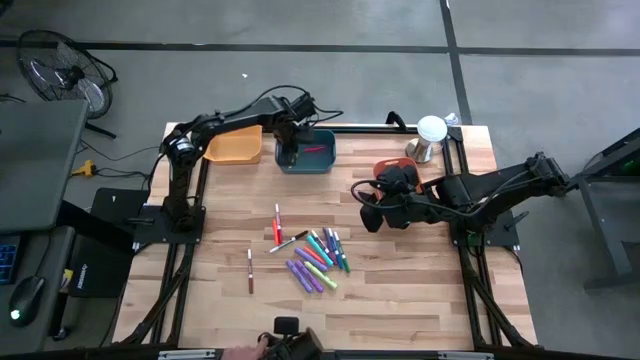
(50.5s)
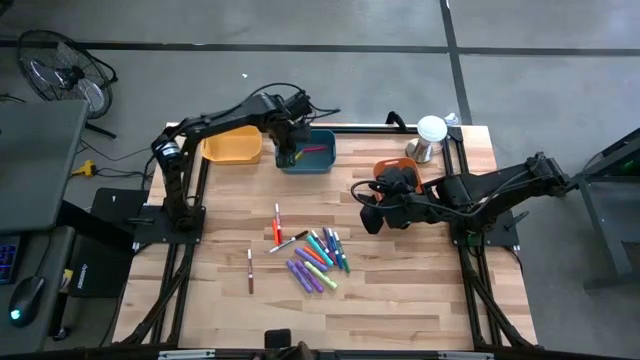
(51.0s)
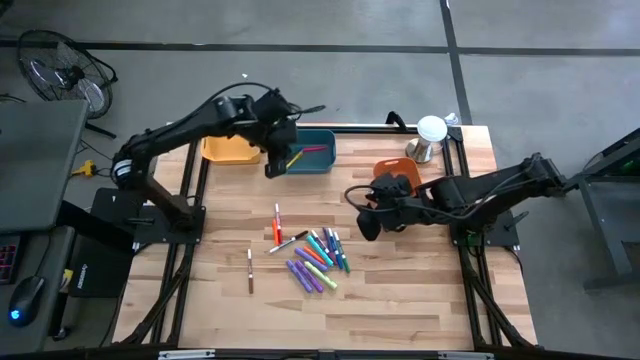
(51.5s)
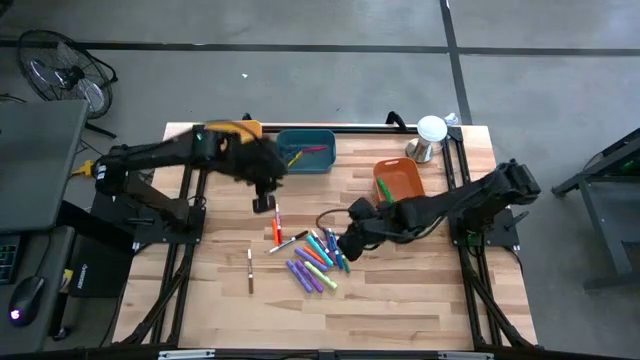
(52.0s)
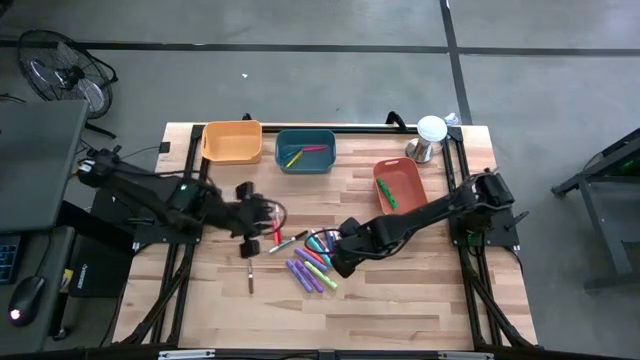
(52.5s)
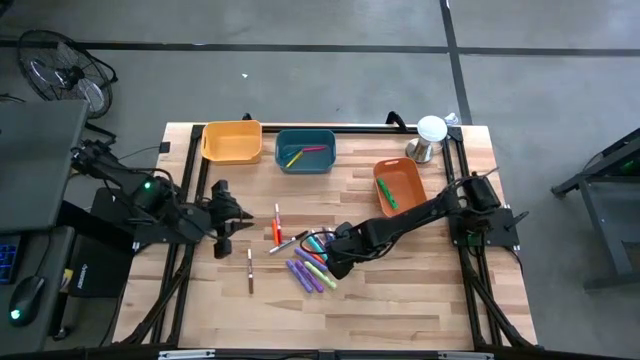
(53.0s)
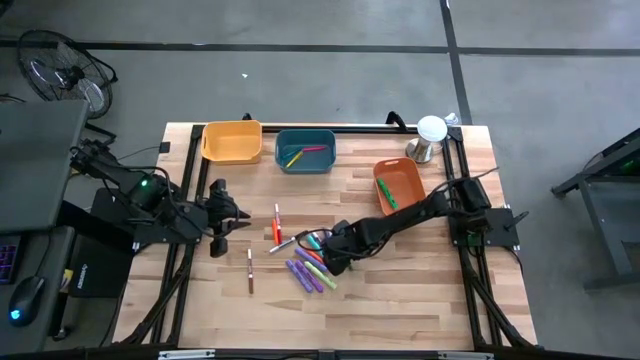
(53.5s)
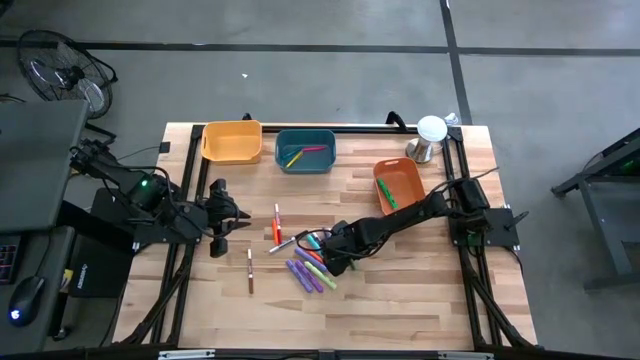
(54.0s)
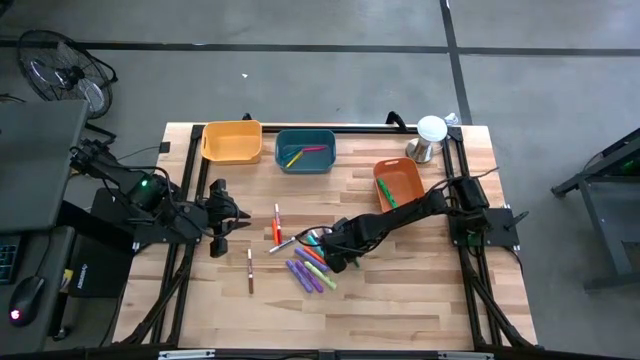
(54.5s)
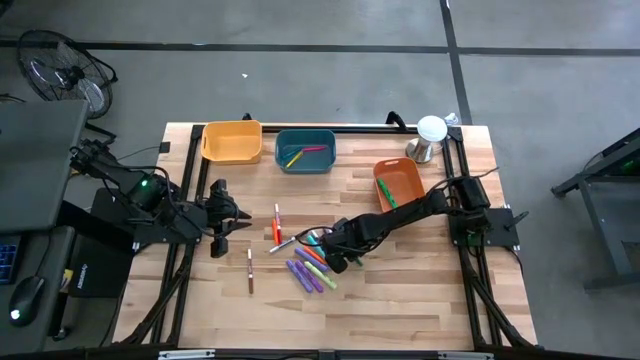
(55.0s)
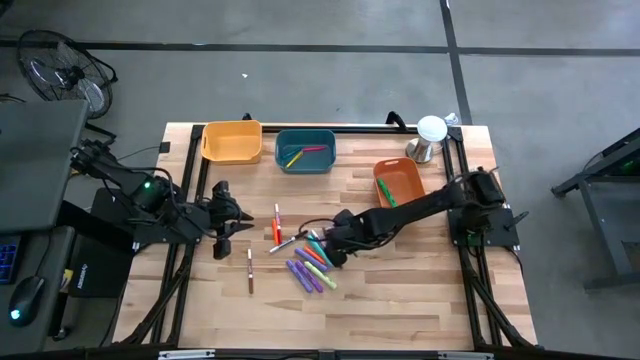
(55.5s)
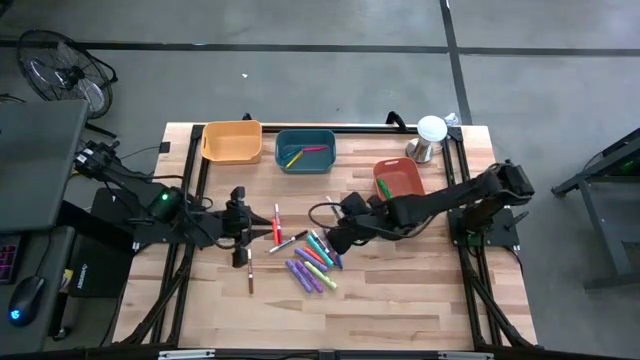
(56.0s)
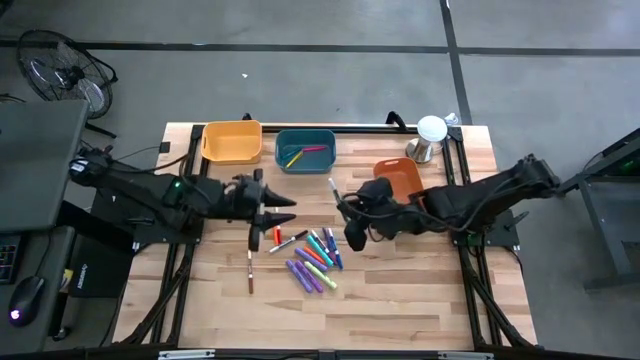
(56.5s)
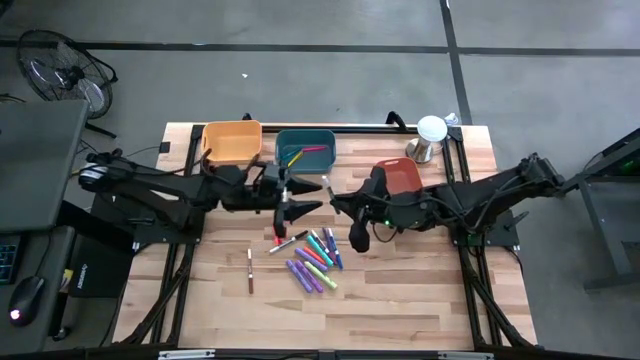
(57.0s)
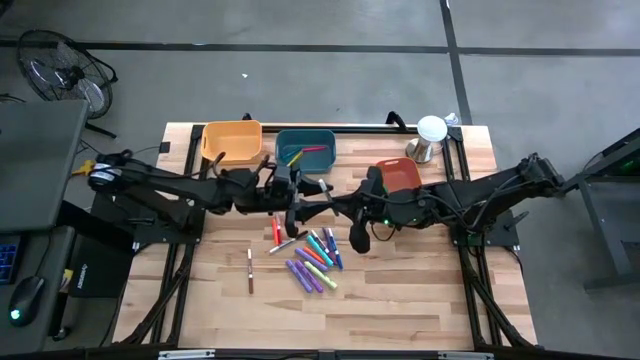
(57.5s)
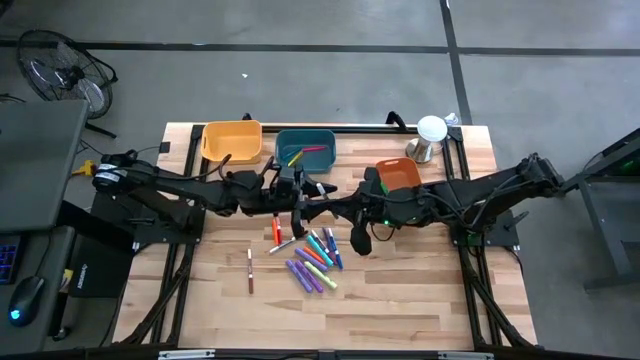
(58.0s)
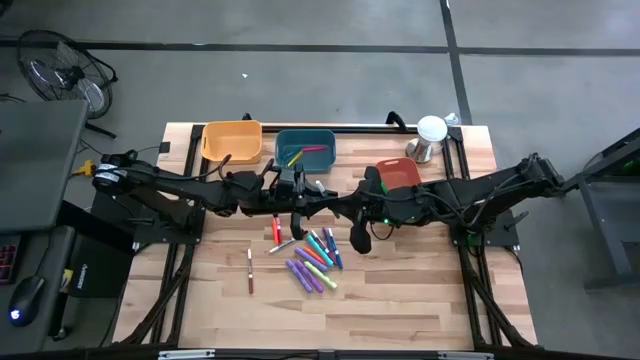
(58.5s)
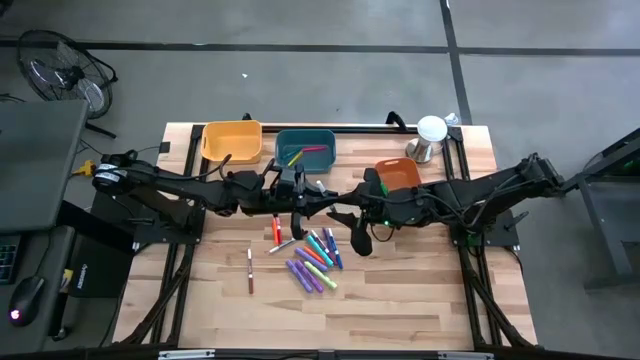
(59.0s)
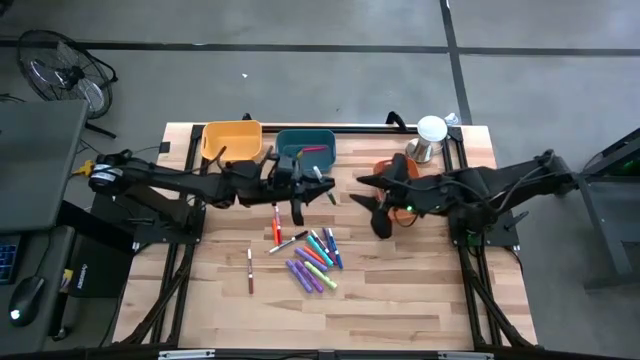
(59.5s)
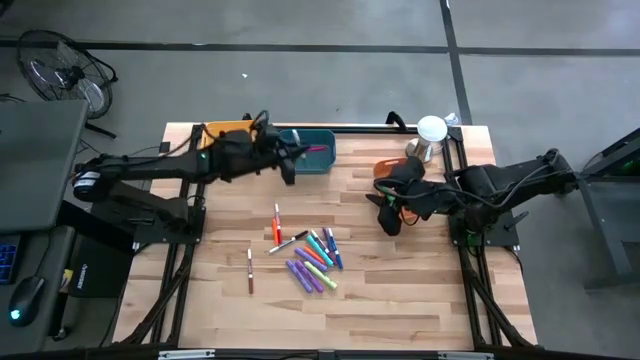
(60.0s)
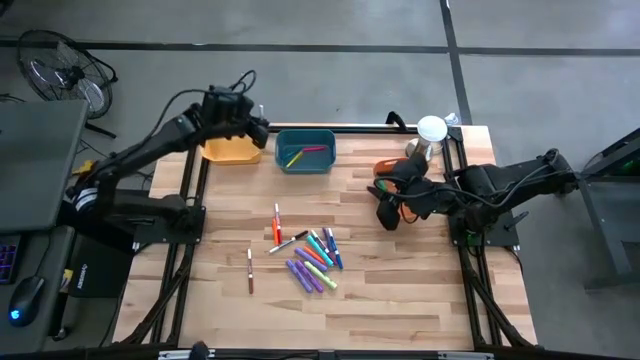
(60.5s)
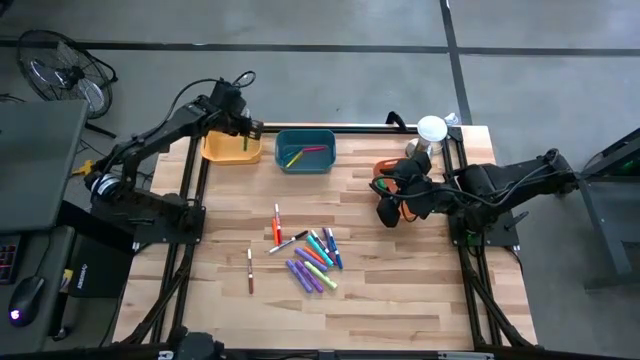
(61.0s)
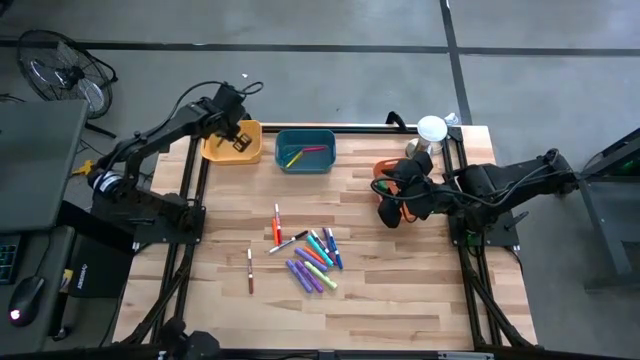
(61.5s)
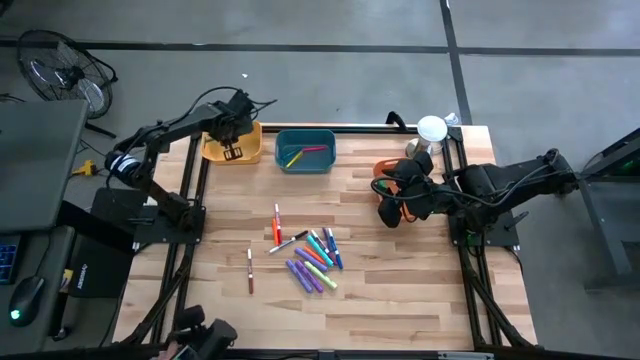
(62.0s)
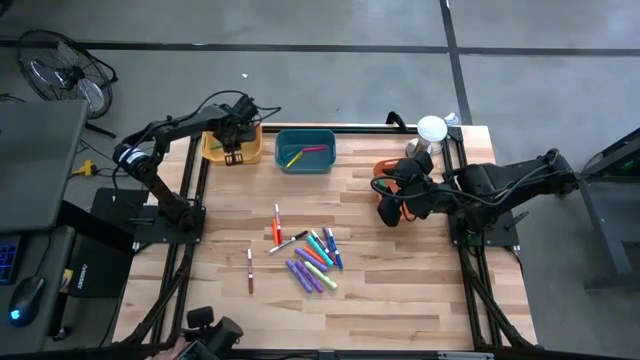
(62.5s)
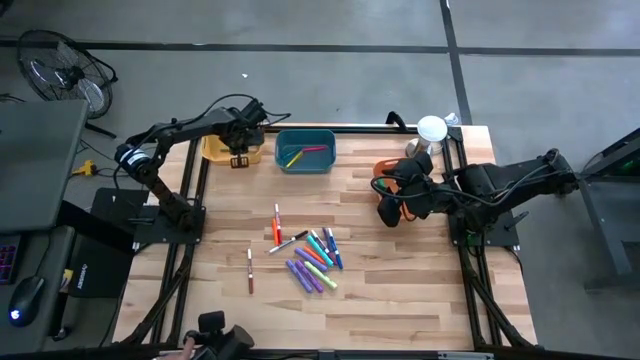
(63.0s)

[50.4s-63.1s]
Task: Pick & Place Markers
Put the green marker pen into the yellow bin
